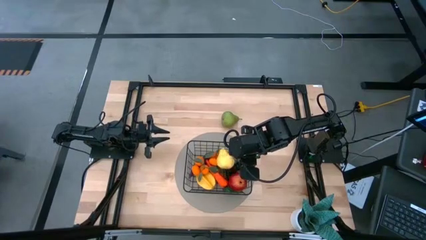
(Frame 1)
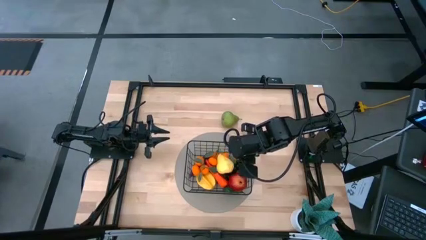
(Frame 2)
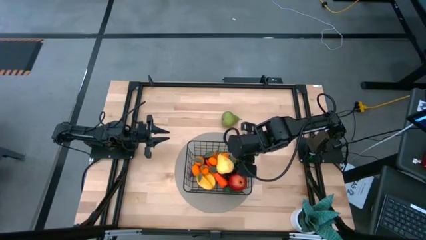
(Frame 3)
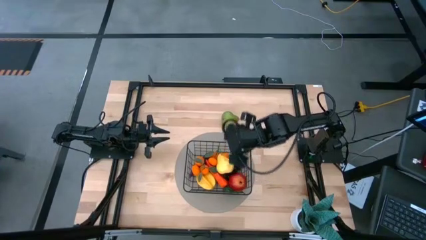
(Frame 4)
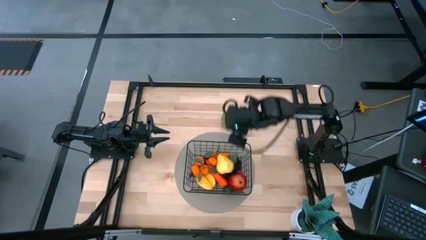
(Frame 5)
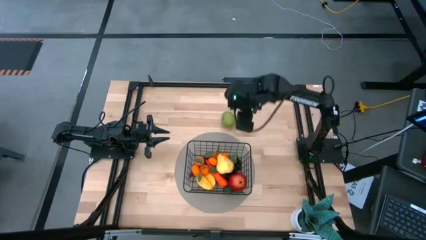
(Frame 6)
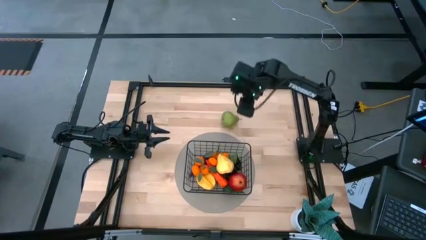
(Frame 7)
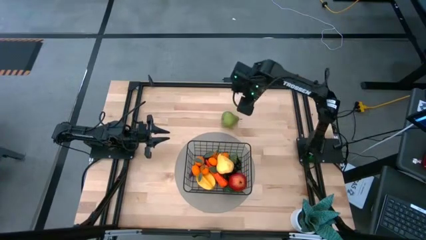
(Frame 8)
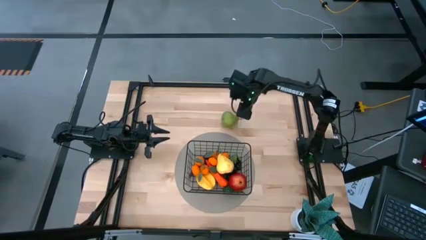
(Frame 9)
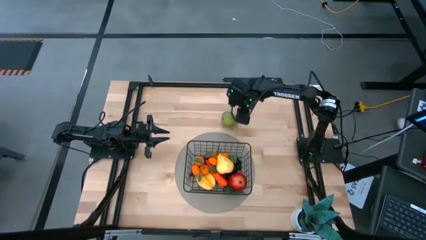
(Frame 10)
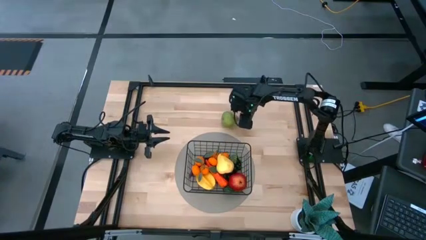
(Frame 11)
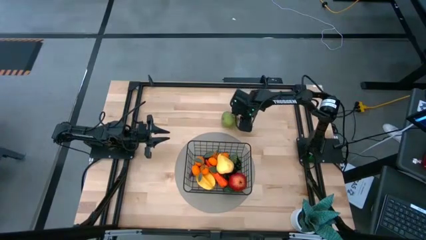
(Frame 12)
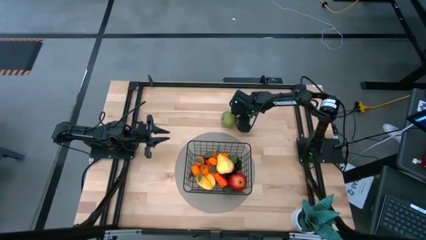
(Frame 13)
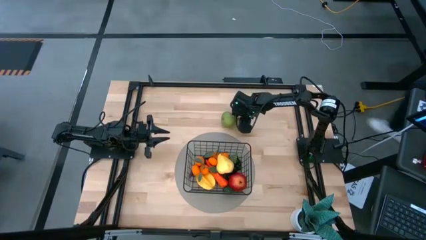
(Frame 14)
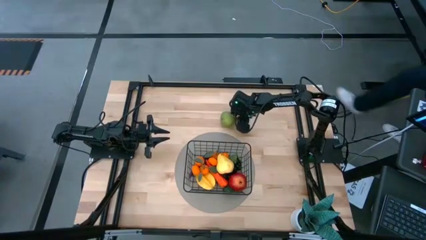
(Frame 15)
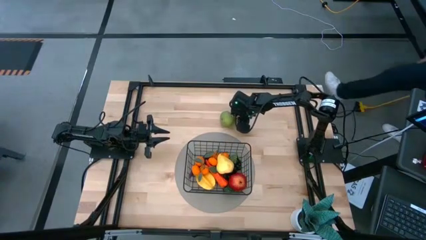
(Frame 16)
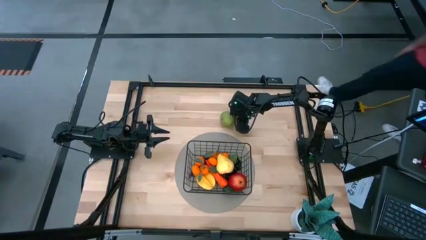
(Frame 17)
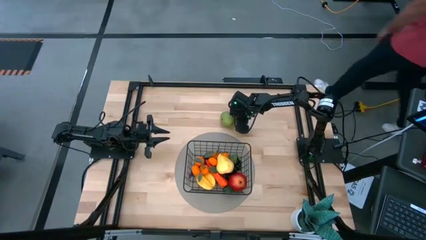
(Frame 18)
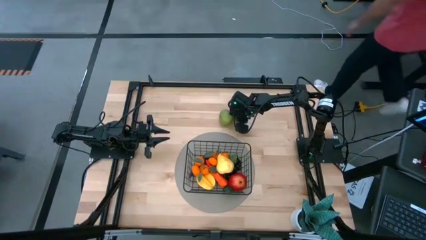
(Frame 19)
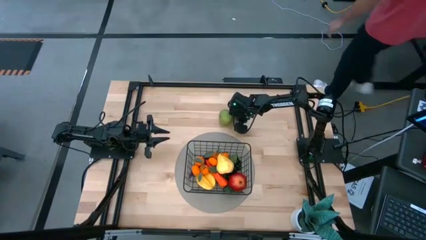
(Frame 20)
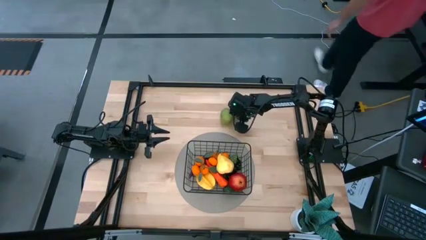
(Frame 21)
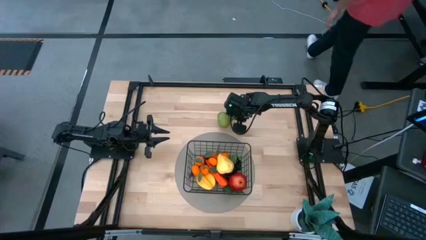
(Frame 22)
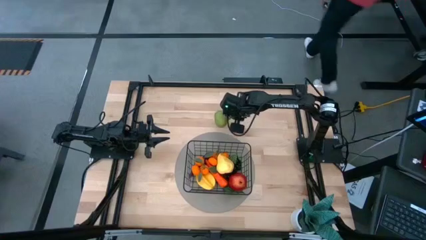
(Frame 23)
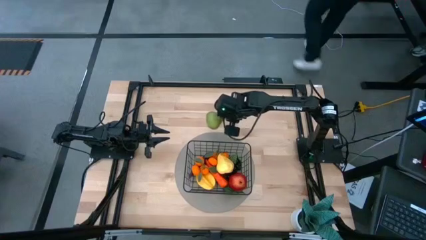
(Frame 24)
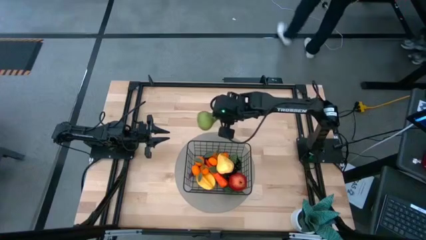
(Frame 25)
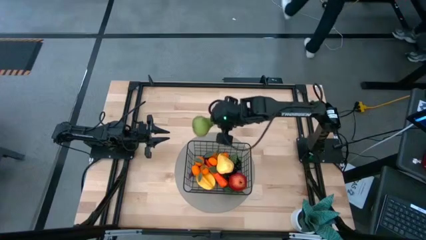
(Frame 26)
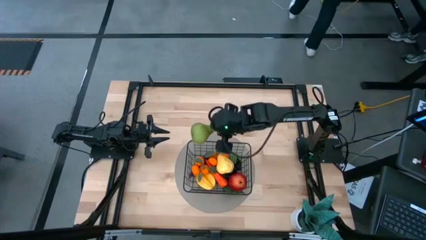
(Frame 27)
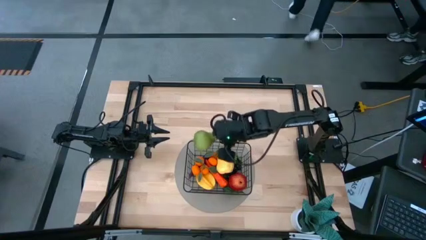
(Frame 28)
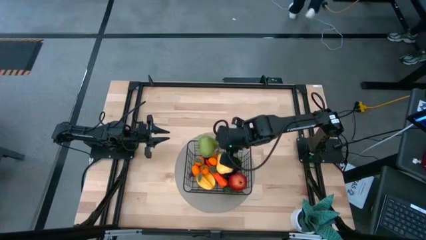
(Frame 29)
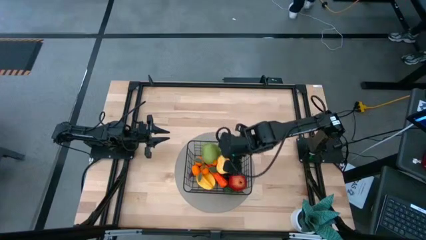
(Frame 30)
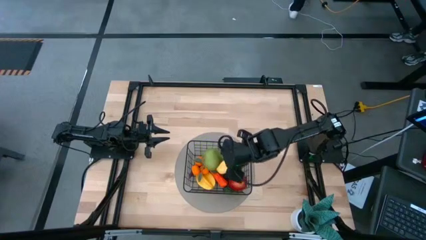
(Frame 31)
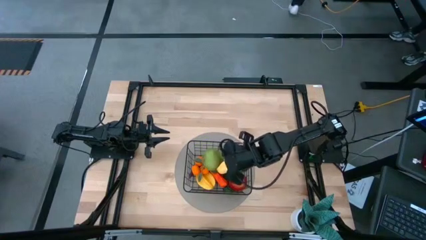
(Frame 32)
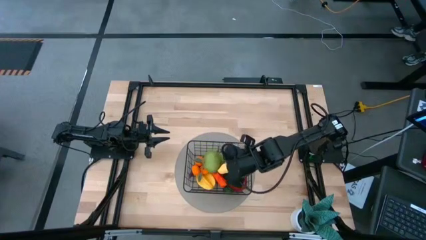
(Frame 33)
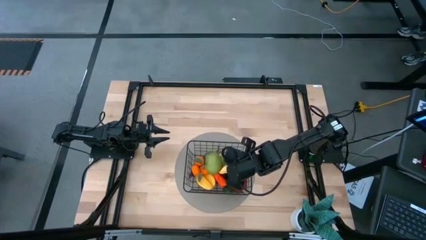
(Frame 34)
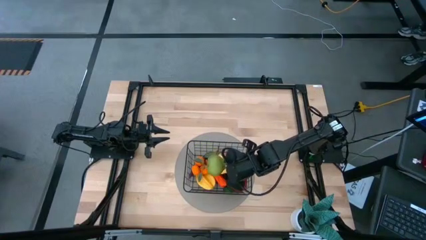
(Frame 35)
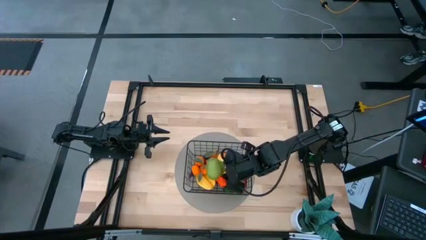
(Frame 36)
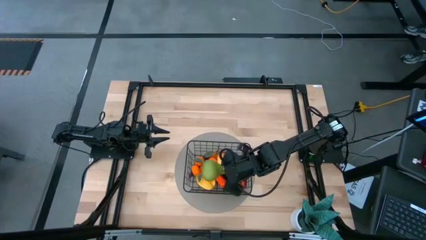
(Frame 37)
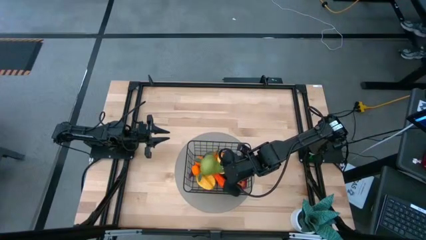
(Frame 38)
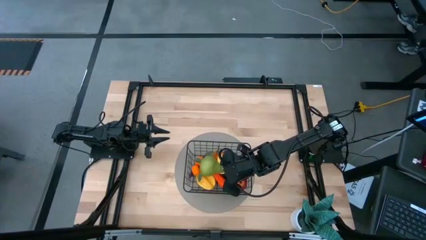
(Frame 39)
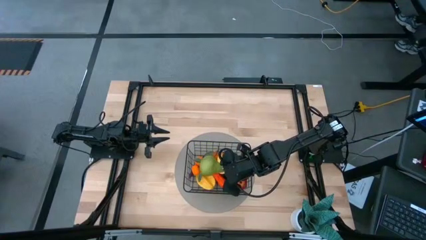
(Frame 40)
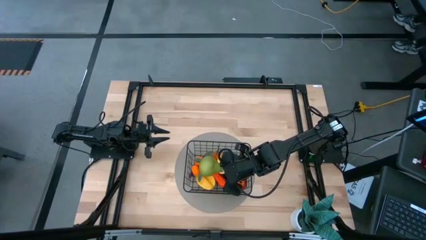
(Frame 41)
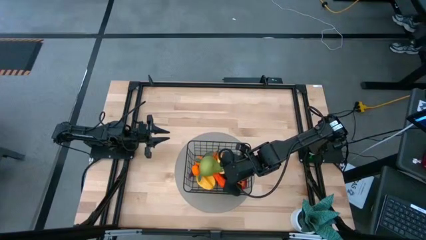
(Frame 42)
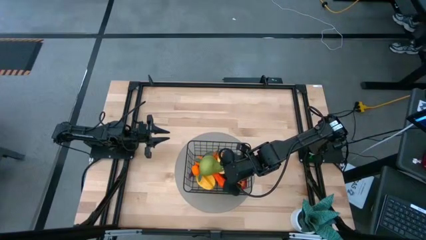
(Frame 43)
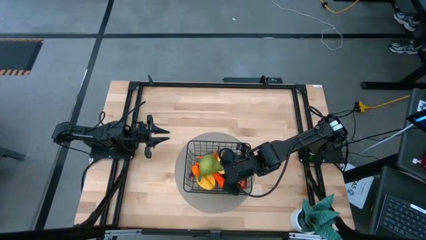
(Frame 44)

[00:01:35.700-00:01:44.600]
Task: Build produce basket
Put the green pear into the wire basket

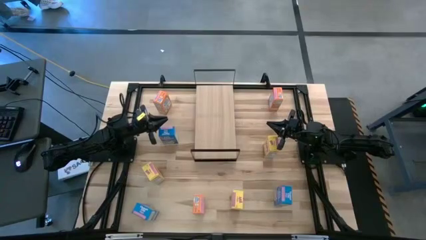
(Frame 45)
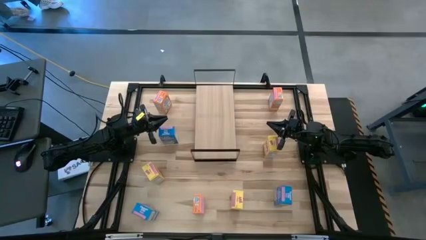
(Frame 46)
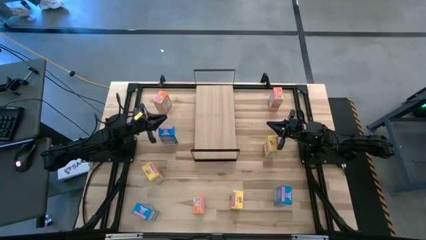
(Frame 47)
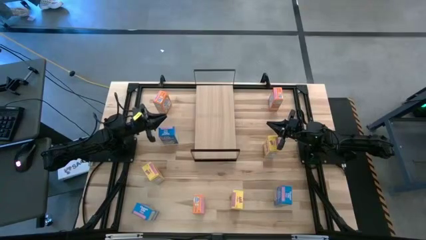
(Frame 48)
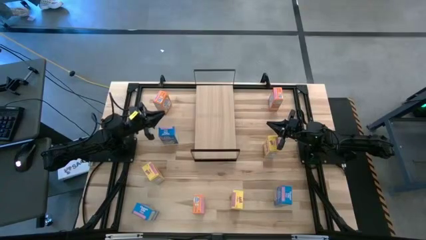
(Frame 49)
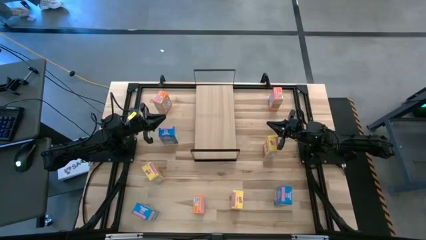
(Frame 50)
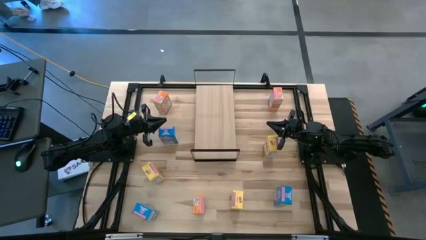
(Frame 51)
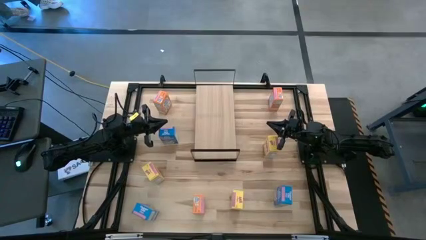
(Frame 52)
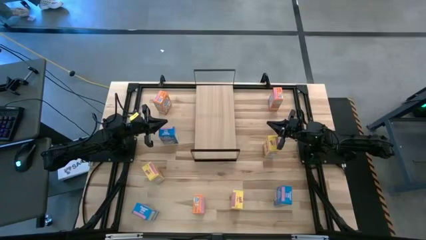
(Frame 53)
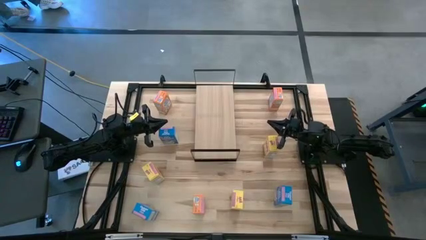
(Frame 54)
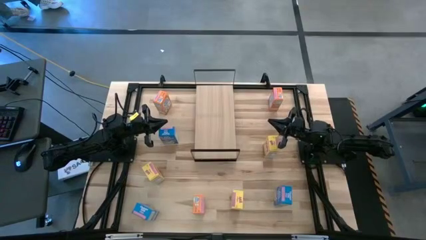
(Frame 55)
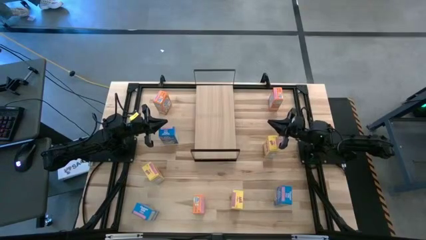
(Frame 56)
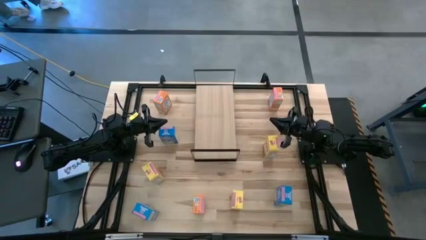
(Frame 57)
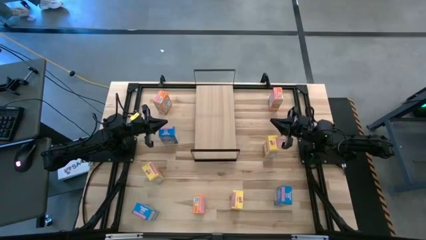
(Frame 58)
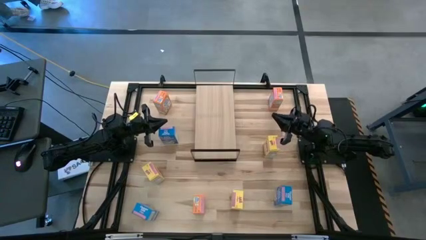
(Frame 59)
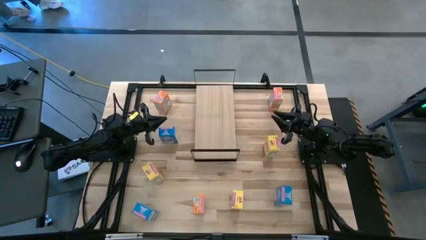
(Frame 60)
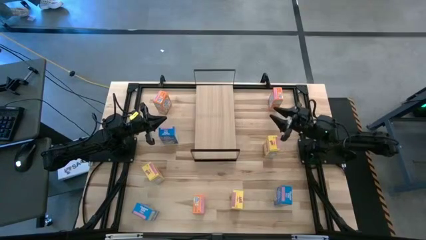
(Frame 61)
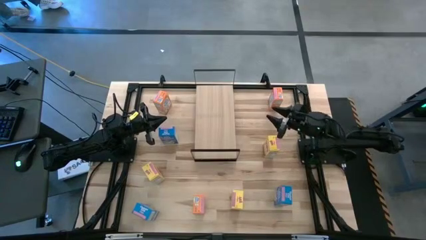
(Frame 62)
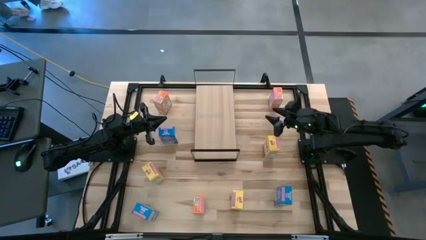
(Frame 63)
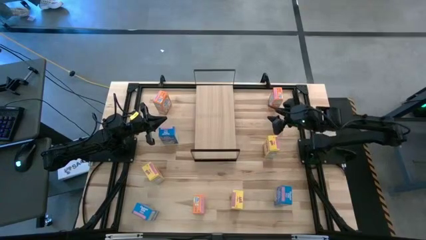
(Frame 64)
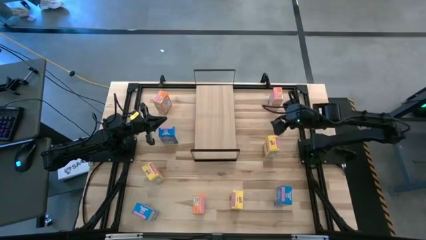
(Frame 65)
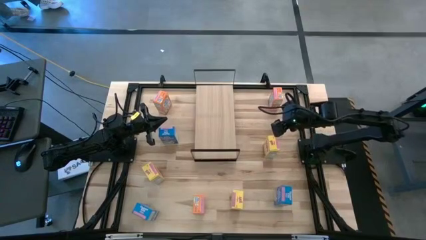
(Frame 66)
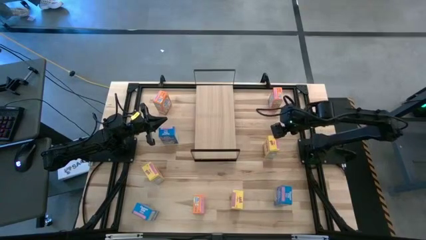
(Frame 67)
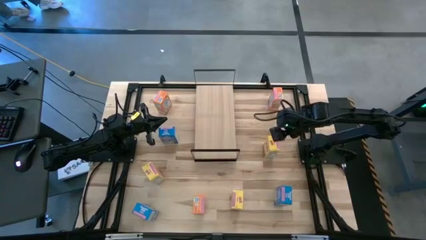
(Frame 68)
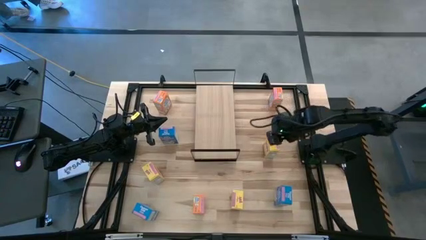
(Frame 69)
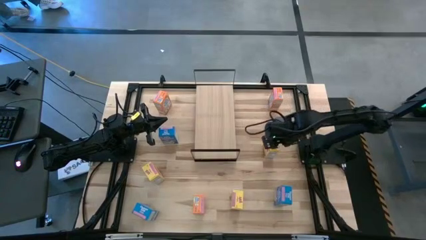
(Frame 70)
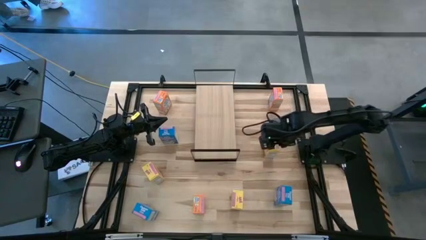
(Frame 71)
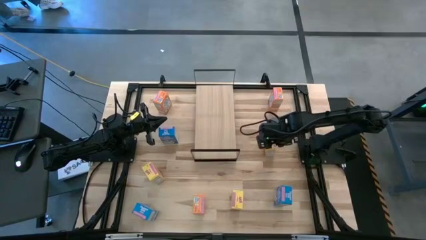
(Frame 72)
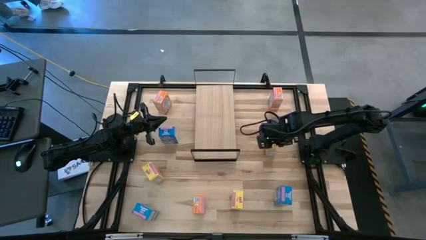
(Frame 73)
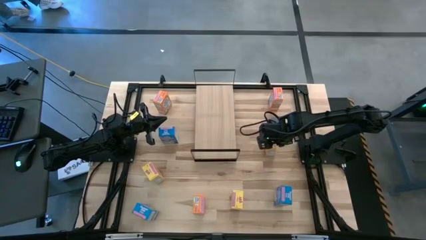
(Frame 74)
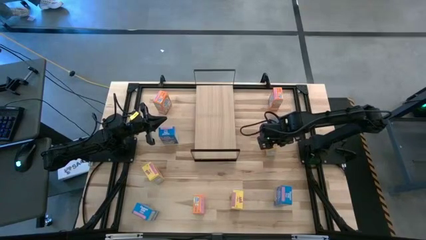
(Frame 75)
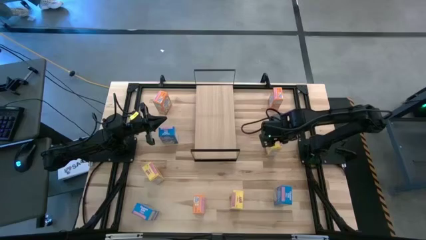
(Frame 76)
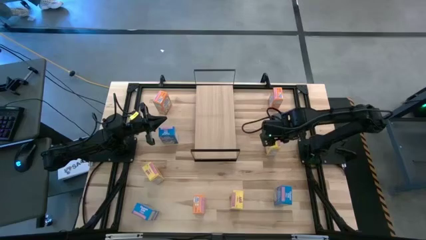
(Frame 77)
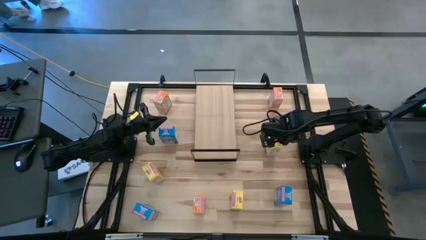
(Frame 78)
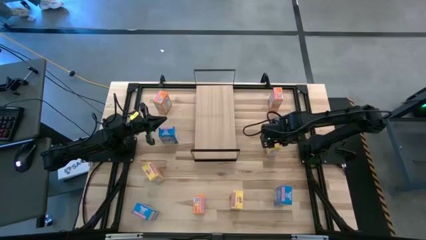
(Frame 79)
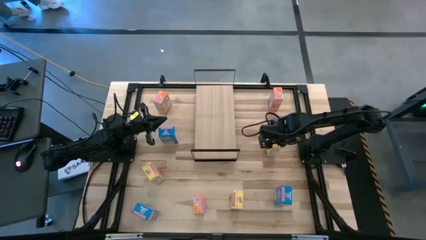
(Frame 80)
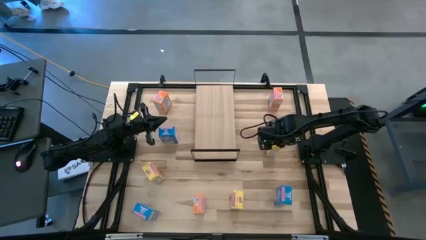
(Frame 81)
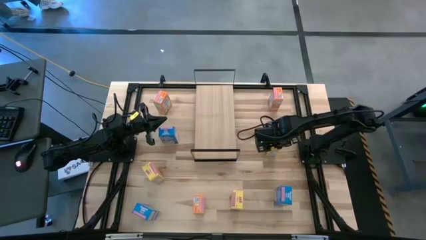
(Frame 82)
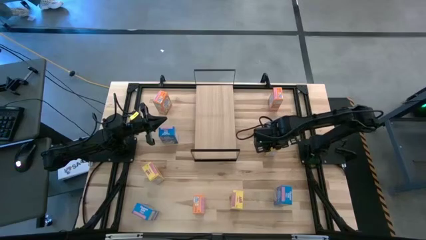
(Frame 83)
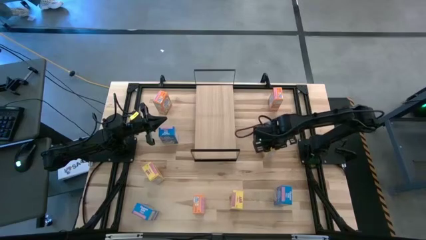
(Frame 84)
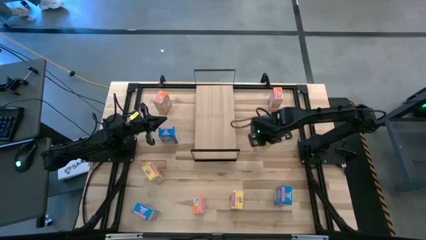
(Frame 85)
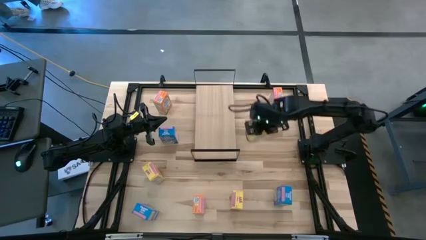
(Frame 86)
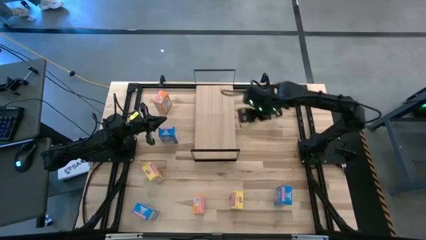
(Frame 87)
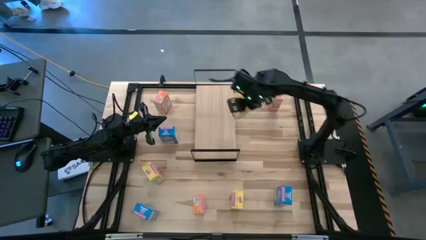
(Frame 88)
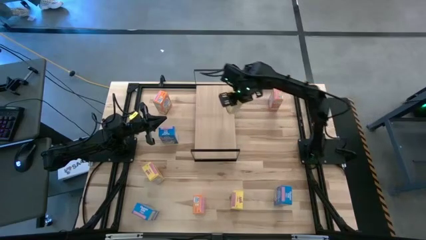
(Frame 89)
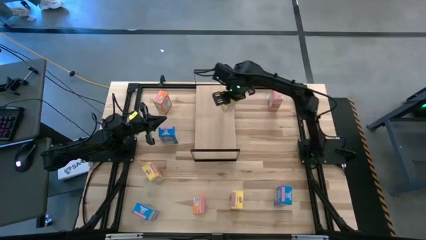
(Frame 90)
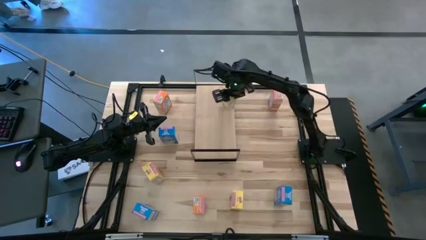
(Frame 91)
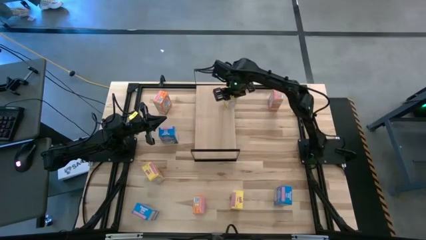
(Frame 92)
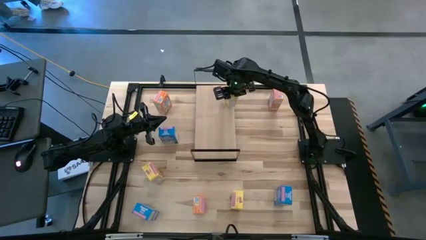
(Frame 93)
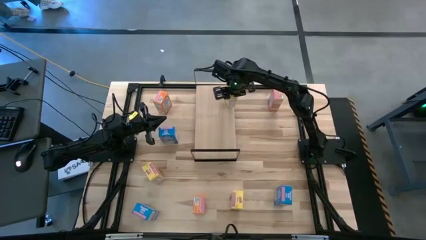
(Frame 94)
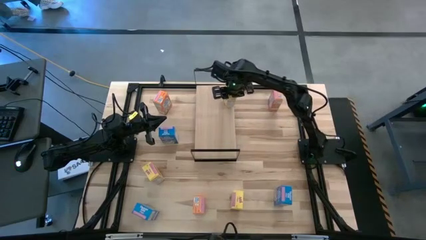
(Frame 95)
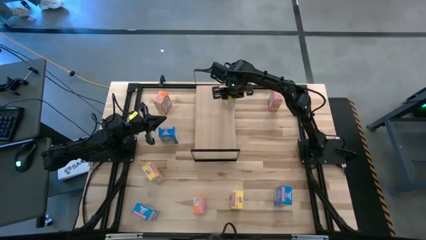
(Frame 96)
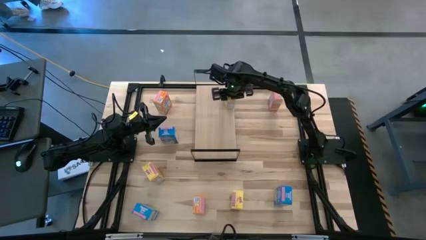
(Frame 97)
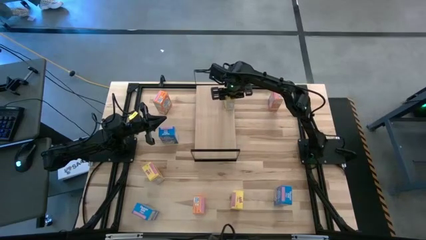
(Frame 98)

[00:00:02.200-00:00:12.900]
Task: Stack cereal on shelf
Put the top right yellow cereal box on the shelf
